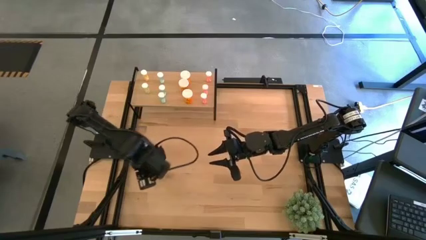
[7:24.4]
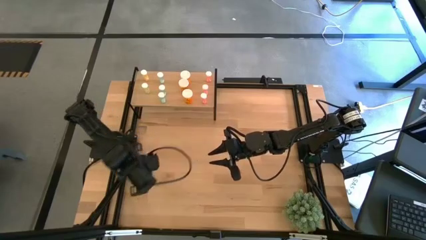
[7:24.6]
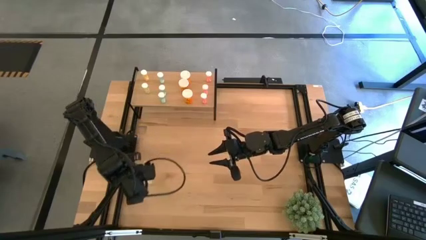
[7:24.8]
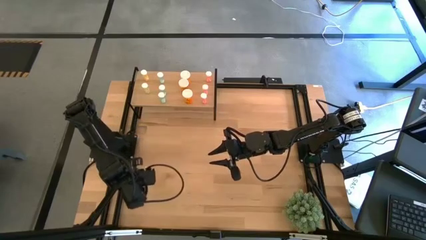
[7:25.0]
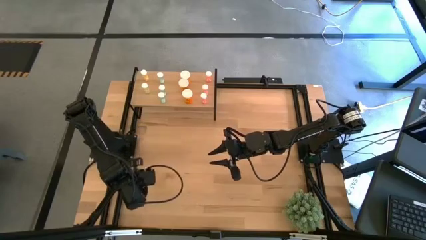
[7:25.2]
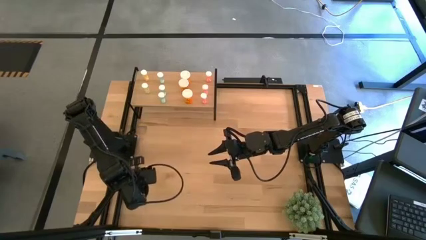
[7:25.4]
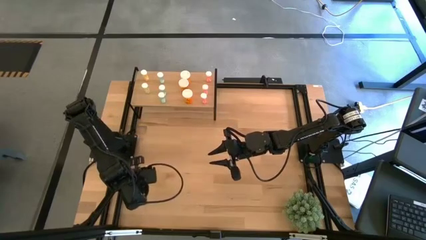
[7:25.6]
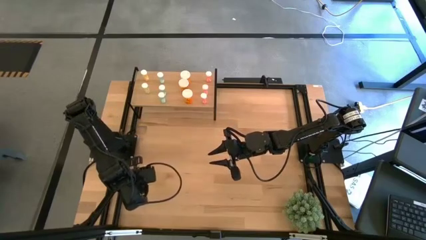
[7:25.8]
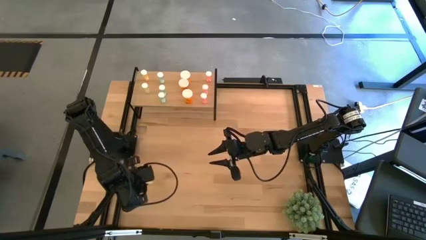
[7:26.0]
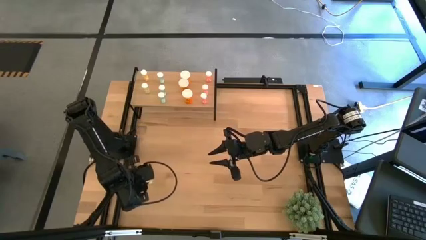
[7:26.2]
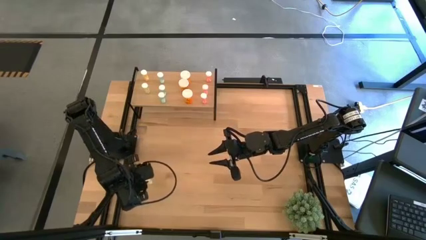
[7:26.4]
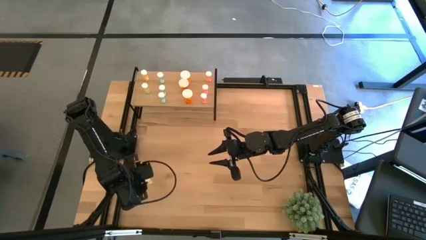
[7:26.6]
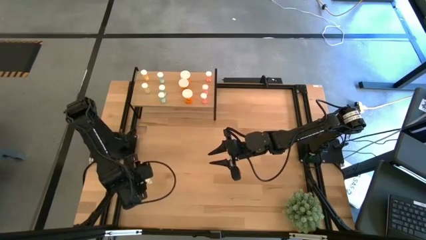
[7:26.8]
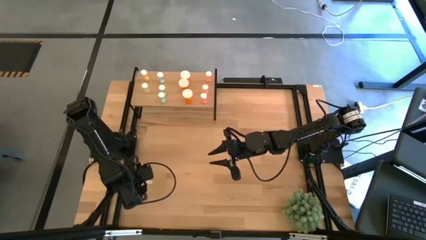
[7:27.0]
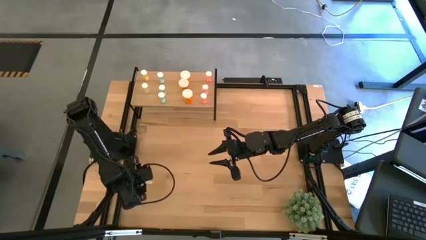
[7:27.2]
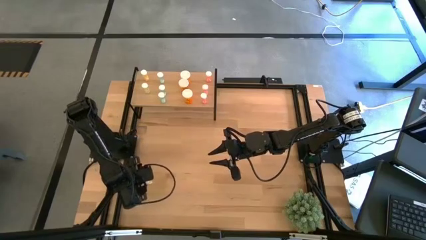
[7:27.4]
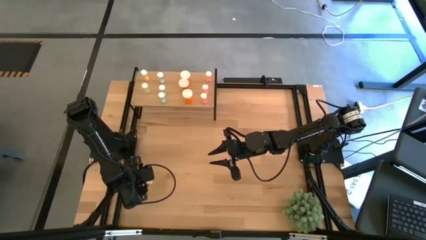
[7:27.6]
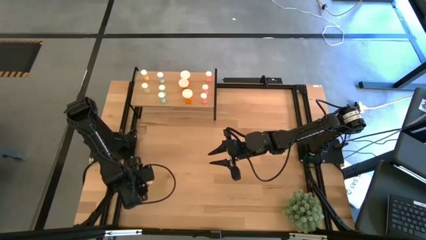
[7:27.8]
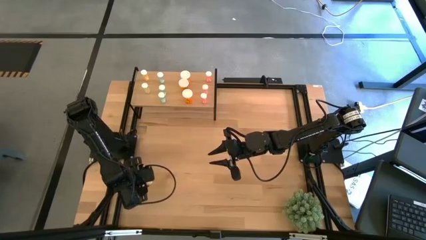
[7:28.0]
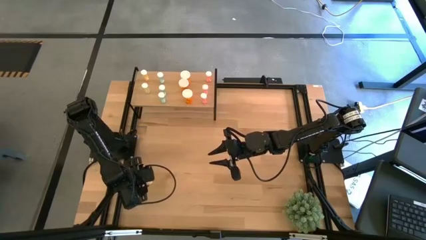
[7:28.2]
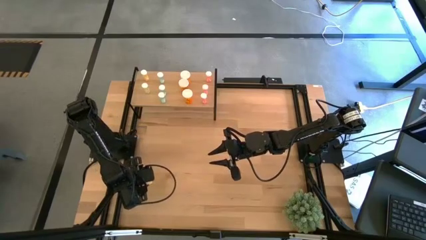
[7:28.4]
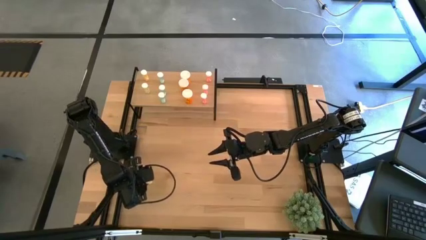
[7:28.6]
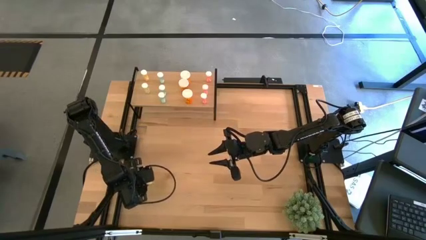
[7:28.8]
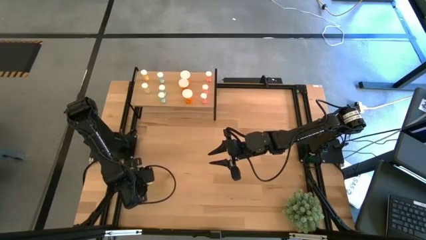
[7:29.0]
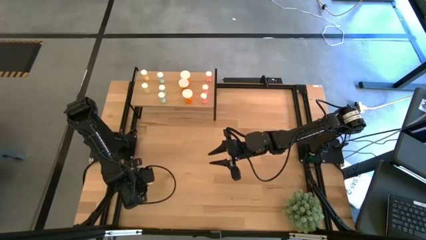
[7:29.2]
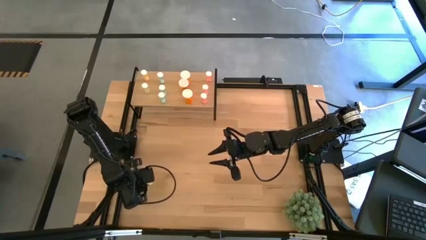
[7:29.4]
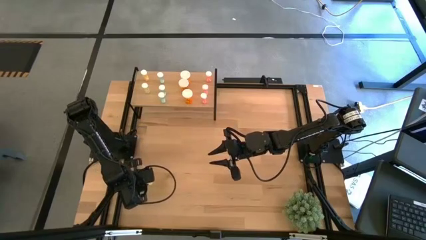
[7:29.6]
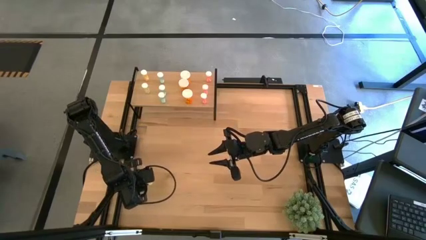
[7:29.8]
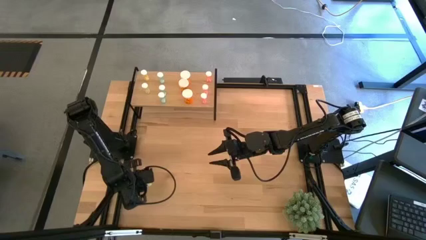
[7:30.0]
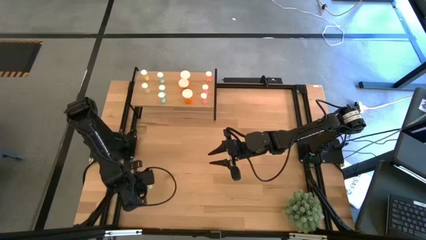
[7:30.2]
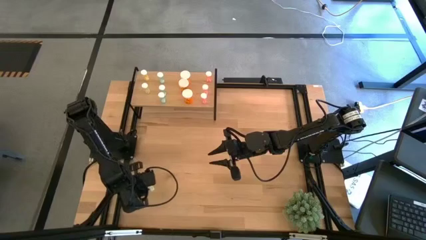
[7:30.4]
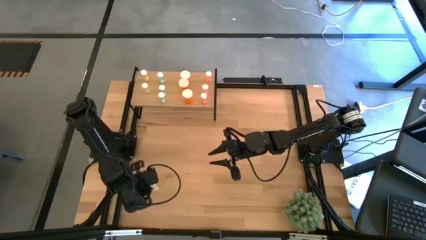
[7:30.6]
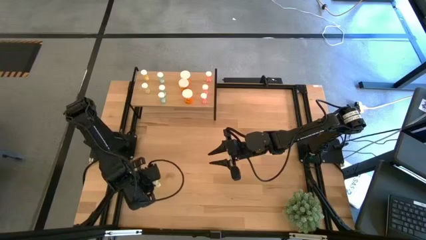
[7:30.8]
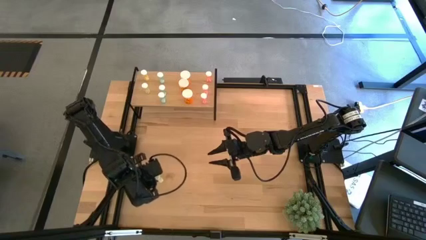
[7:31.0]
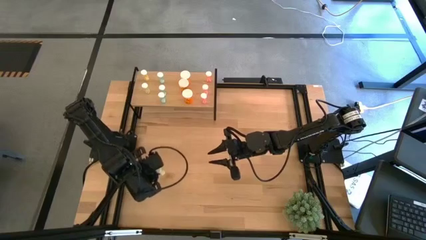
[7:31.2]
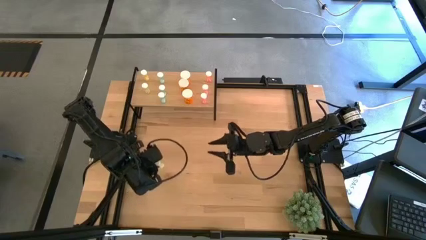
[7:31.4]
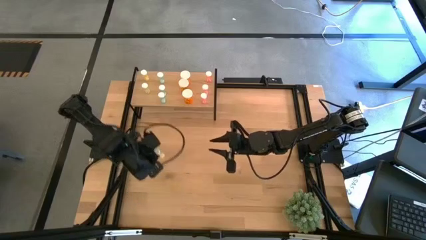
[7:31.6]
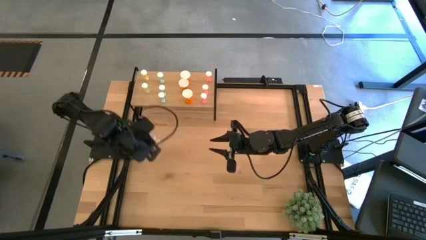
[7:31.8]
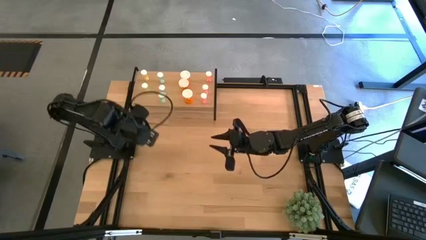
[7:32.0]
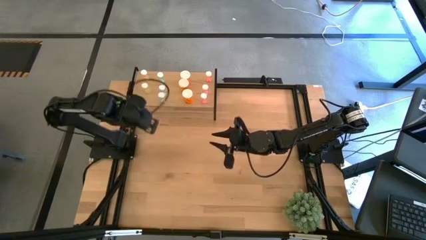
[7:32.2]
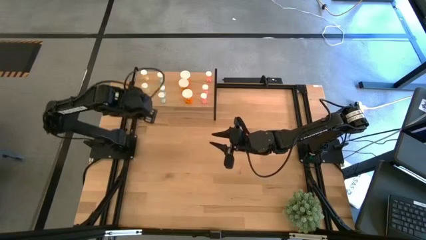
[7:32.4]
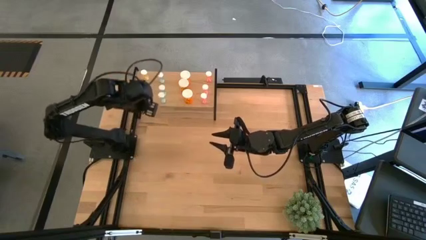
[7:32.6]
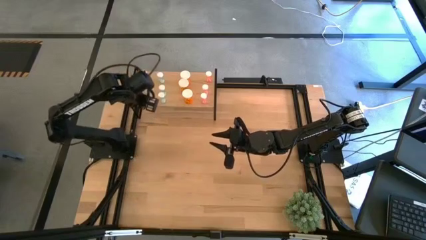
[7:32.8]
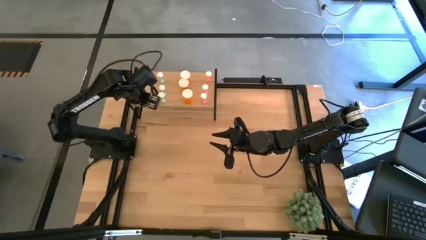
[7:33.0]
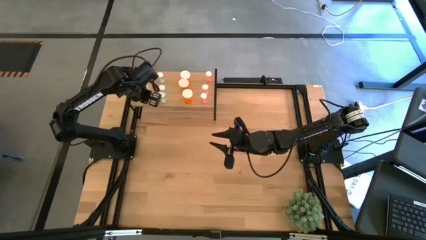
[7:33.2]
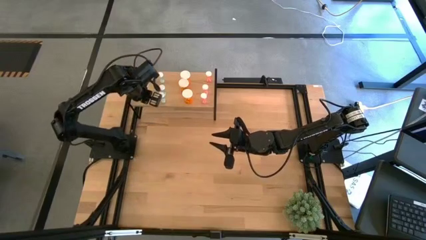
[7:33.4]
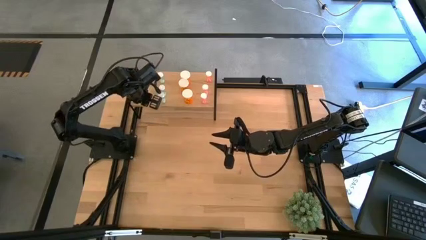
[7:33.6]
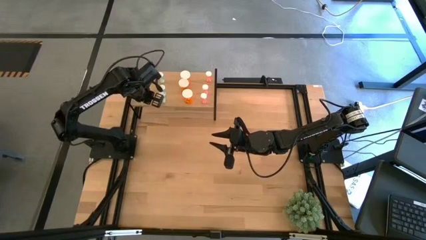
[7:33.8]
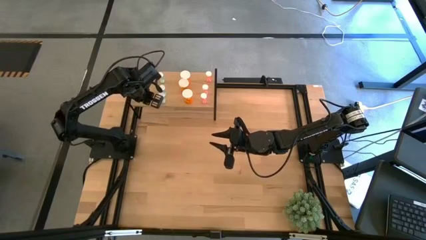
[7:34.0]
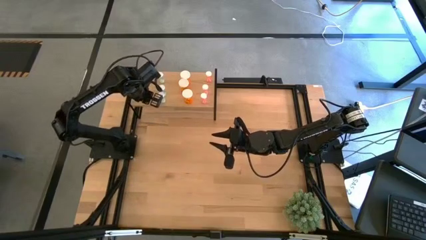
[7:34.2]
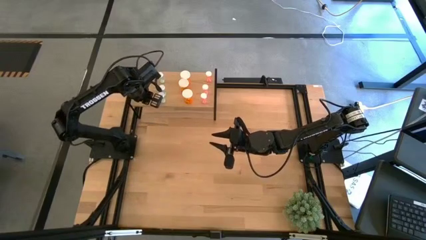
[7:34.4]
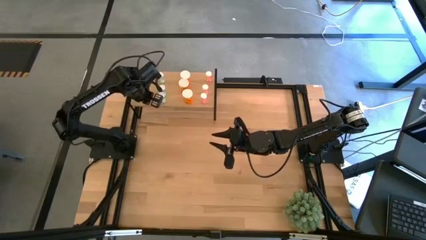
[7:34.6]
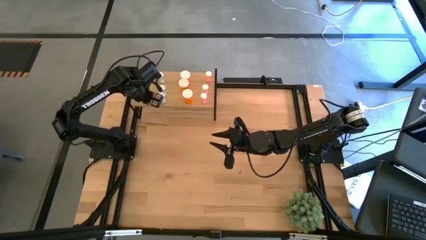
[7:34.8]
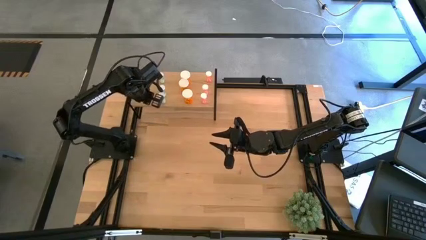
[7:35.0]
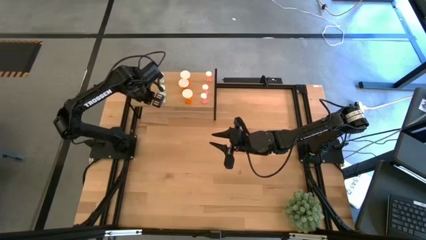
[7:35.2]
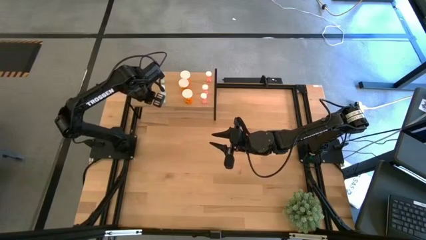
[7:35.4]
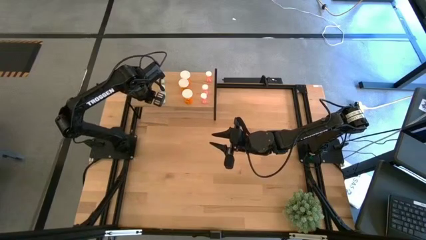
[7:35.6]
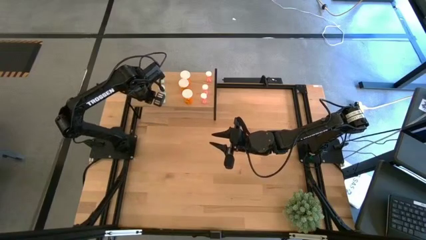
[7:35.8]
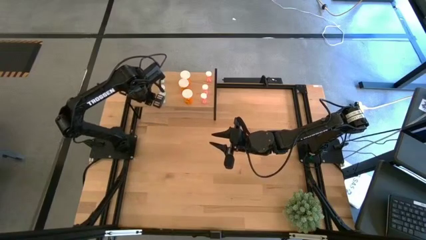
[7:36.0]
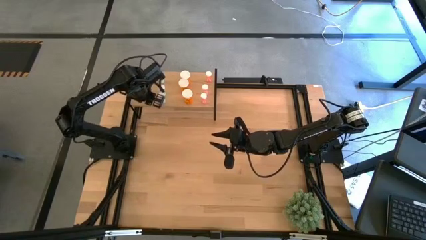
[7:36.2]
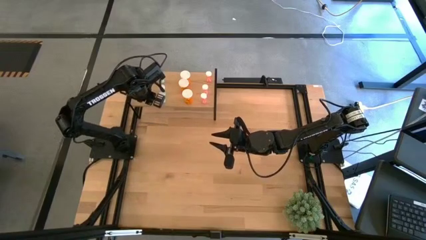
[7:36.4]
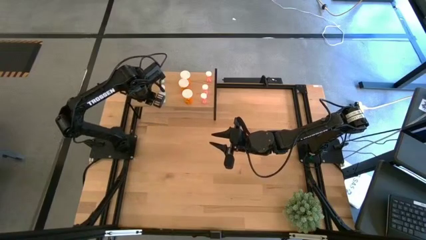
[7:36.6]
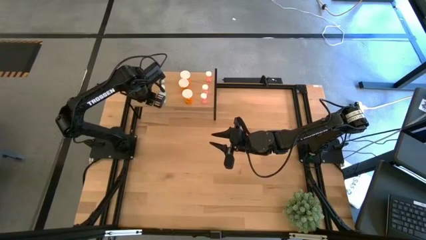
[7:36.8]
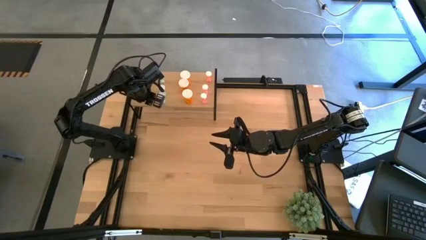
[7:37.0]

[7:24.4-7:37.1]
Task: Pick and place medicine bottles onto shelf by color
Put the yellow pill on the shelf aligned with the yellow pill on the shelf
